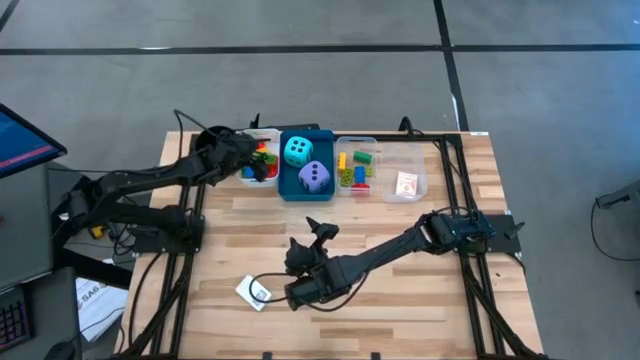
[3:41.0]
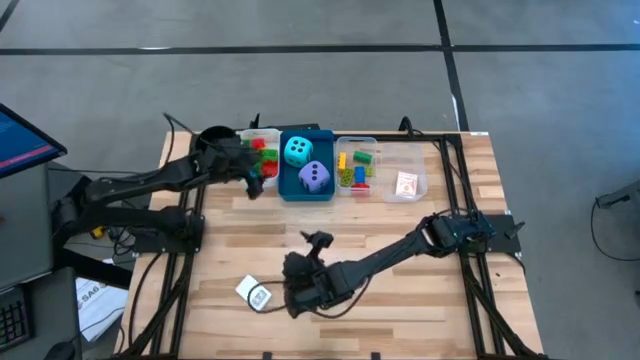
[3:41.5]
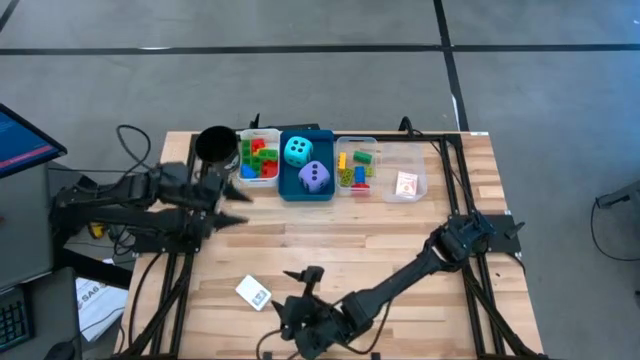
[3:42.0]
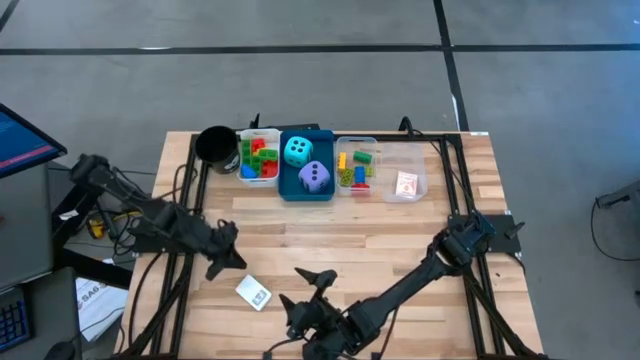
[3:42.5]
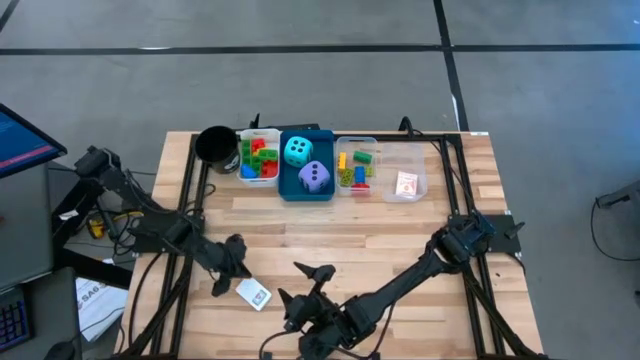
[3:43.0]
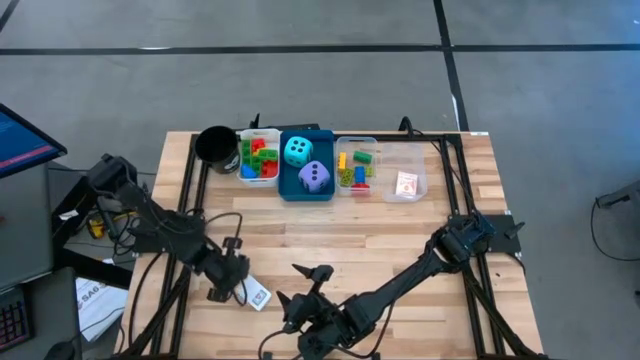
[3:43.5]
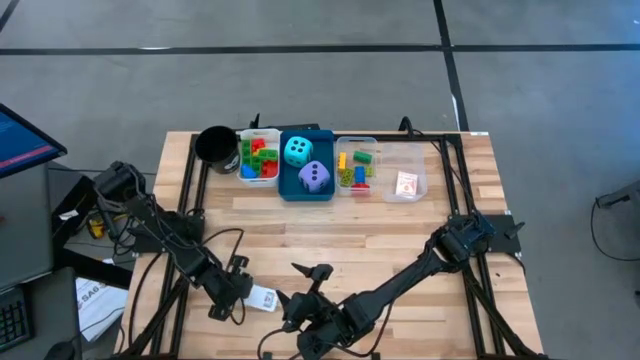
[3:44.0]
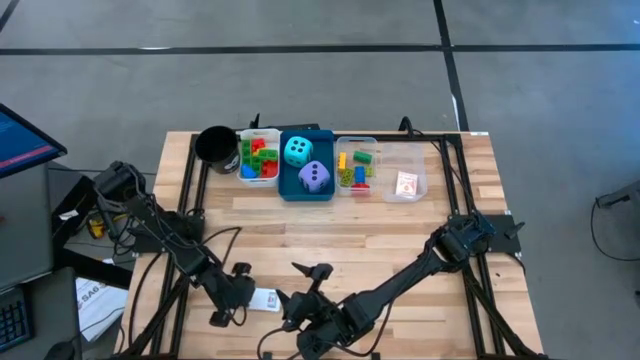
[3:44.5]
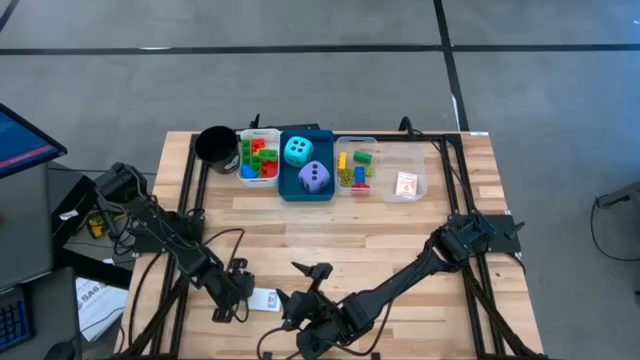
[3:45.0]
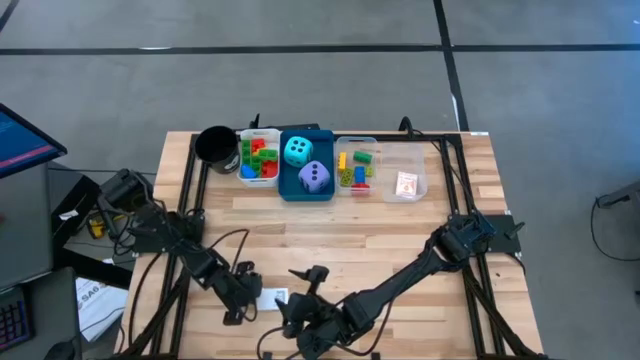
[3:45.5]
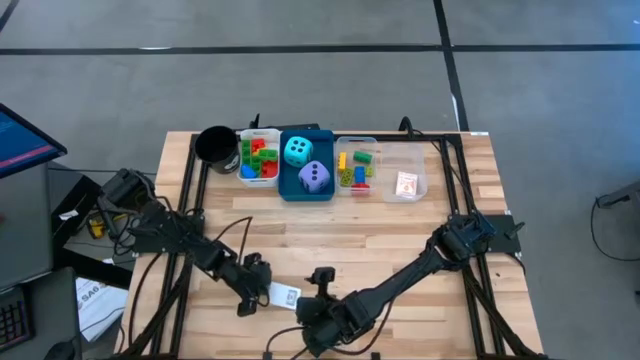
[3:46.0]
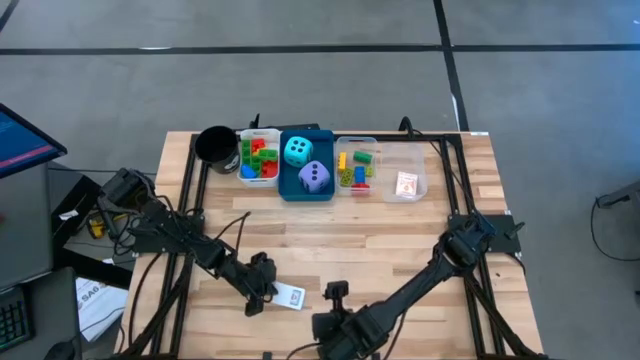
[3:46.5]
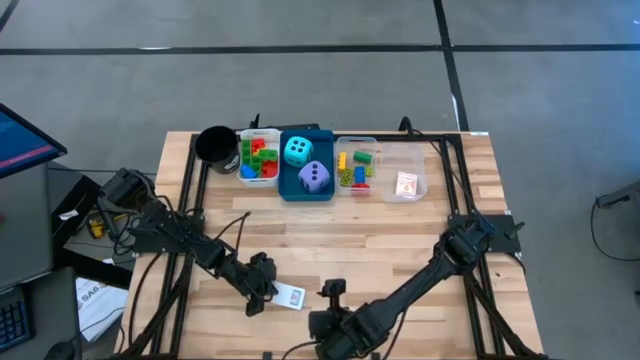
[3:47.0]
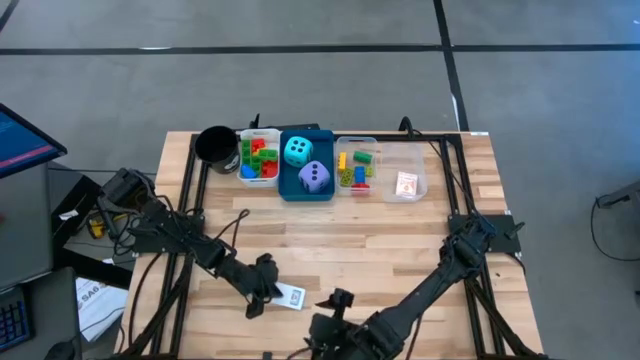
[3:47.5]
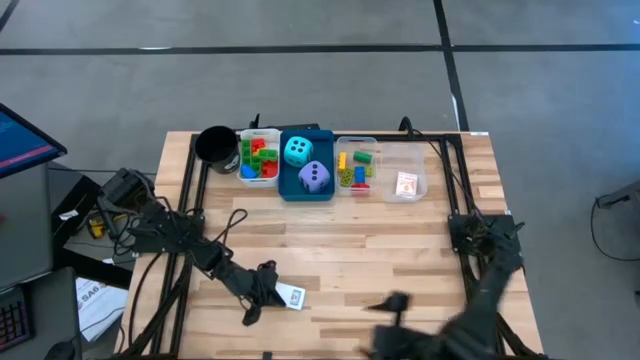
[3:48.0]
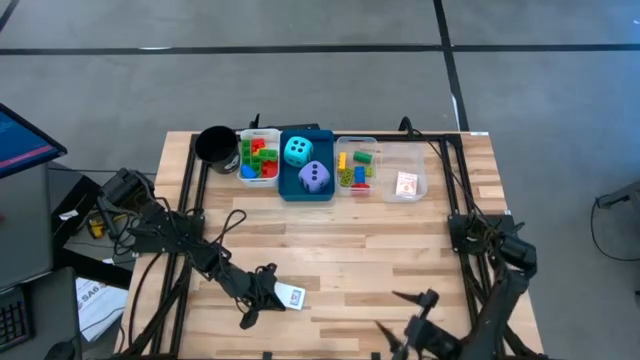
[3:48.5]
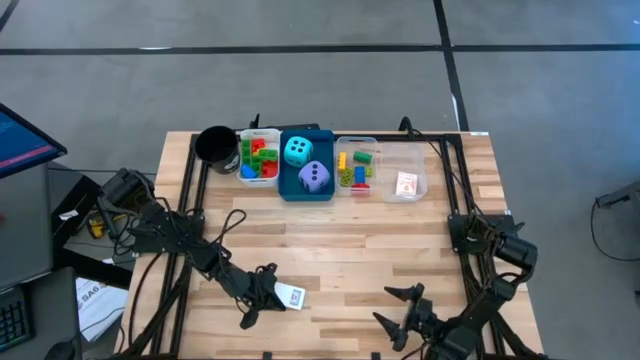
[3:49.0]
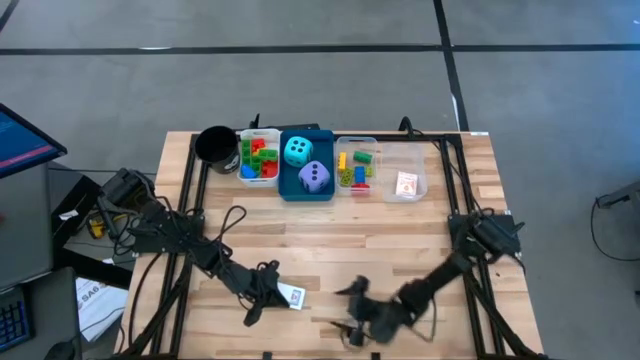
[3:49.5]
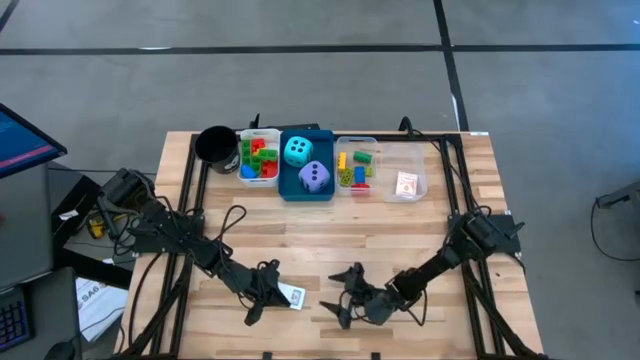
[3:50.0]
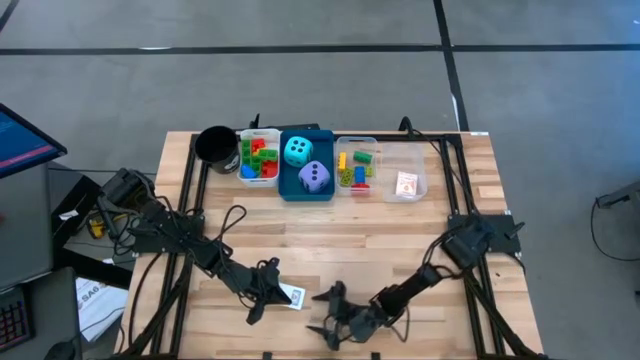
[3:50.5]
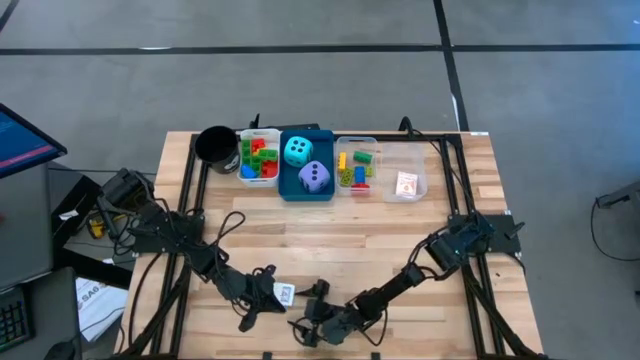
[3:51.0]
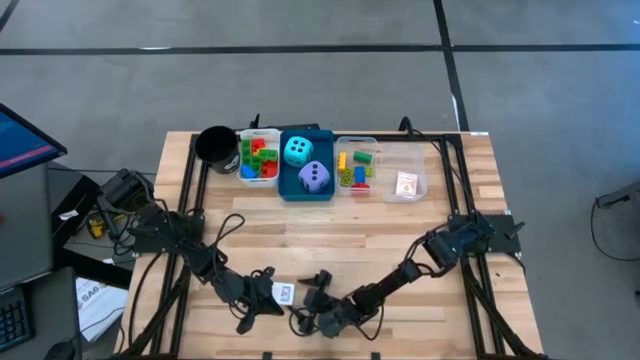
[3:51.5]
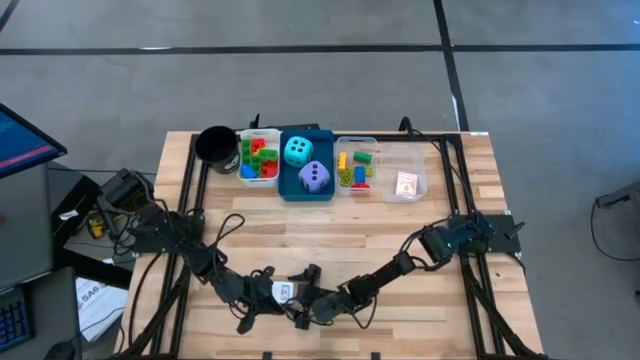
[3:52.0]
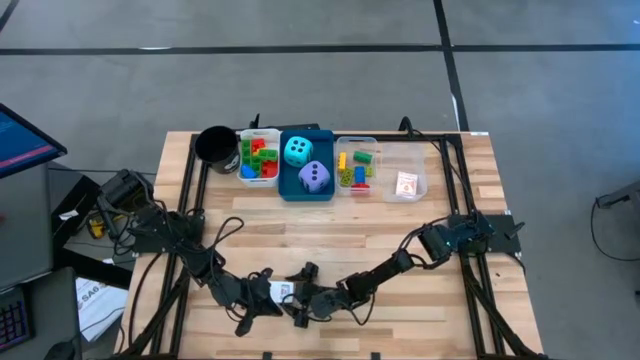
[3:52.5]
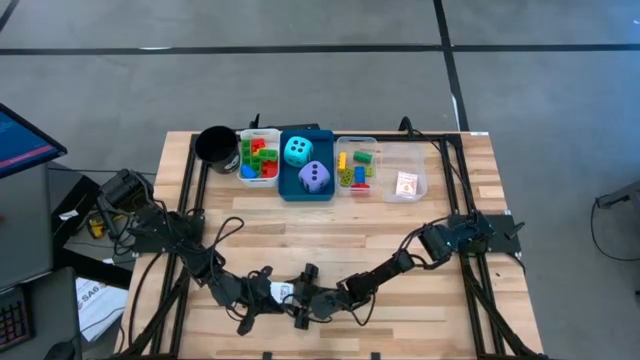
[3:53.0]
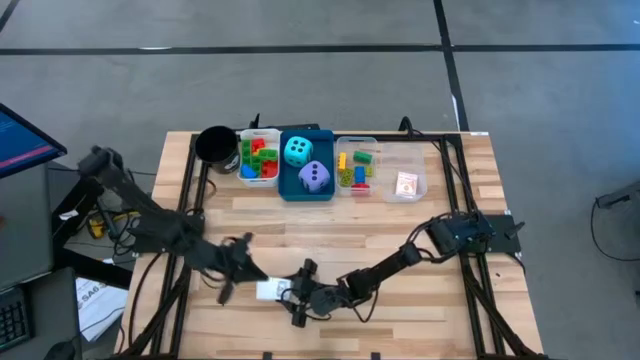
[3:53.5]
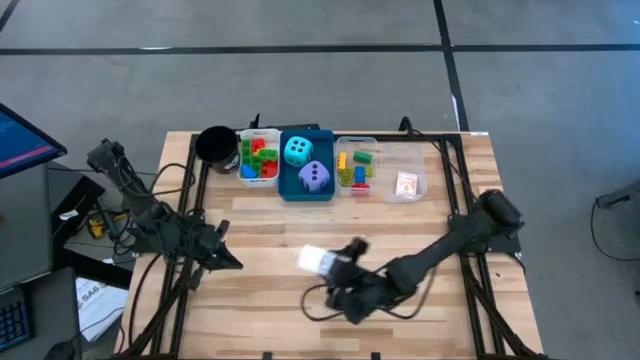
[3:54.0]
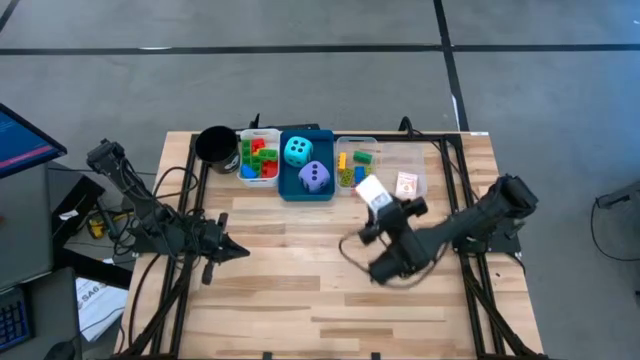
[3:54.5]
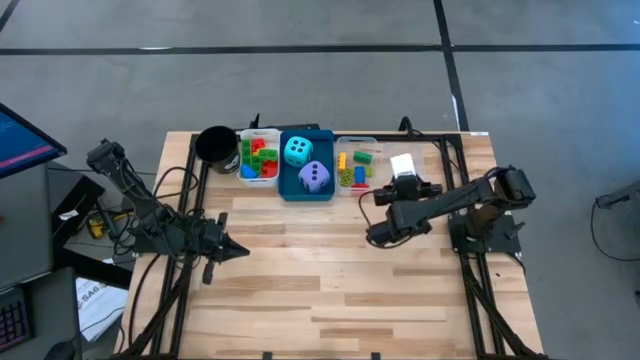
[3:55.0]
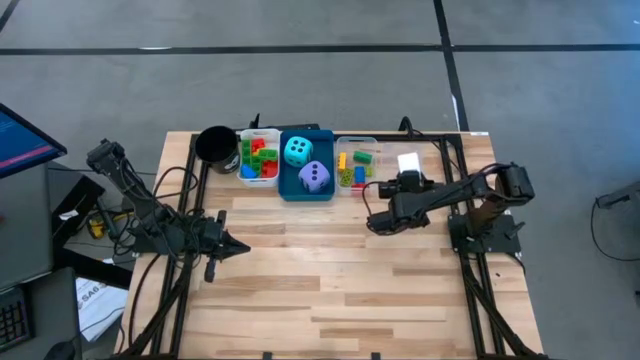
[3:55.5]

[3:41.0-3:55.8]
Task: Pick & Place Toys
Put the blue deck of cards into the right transparent bin

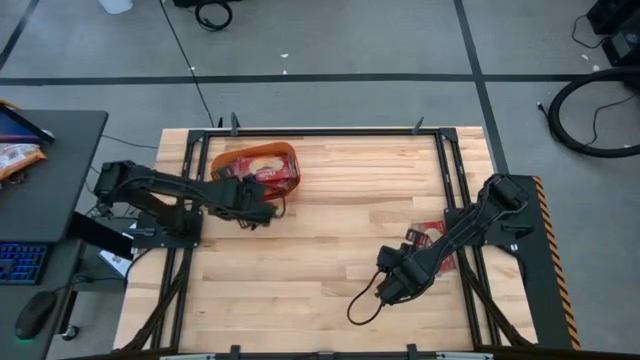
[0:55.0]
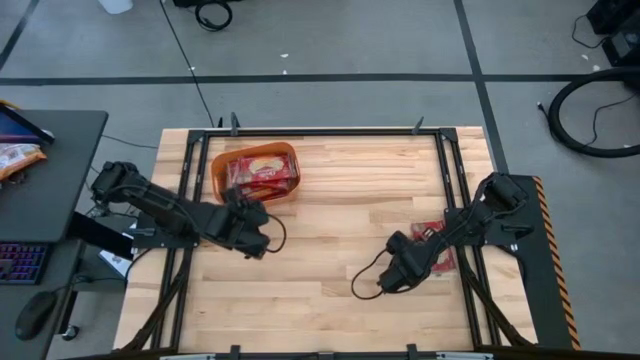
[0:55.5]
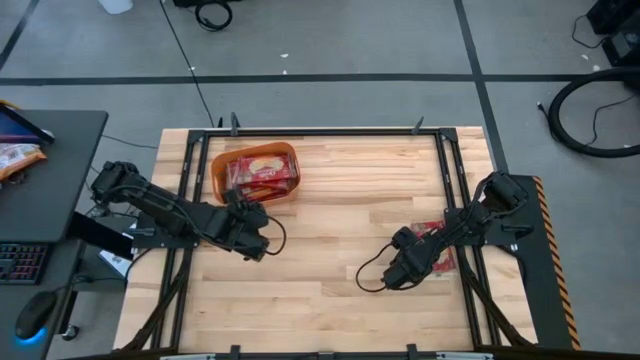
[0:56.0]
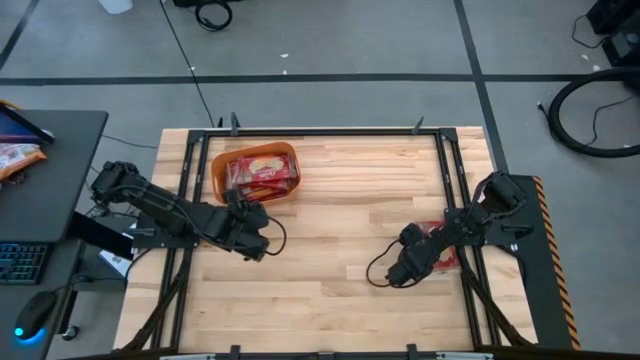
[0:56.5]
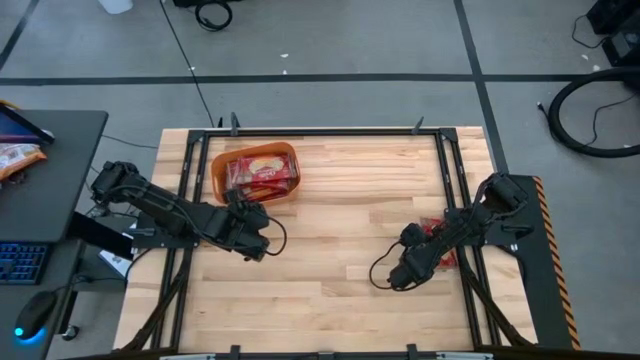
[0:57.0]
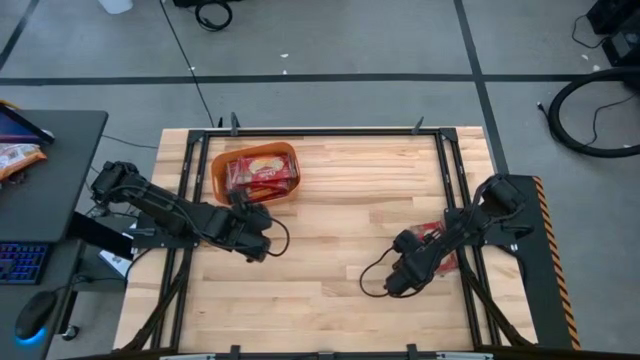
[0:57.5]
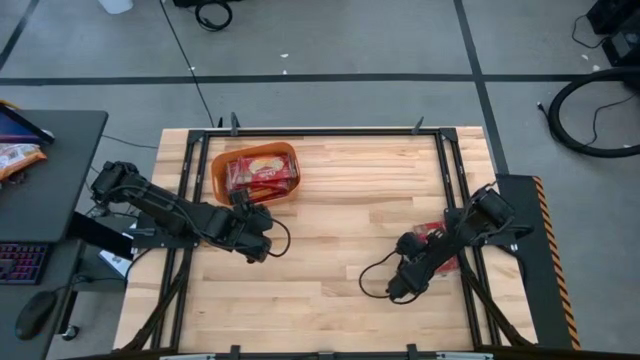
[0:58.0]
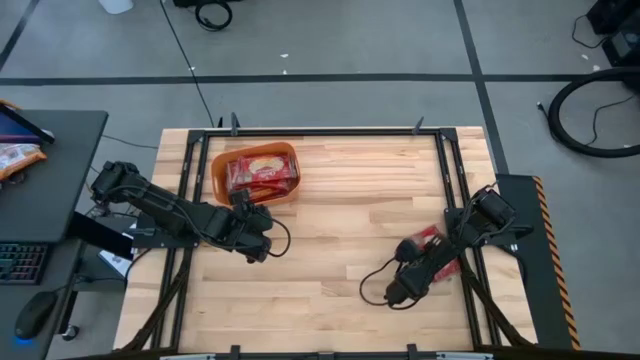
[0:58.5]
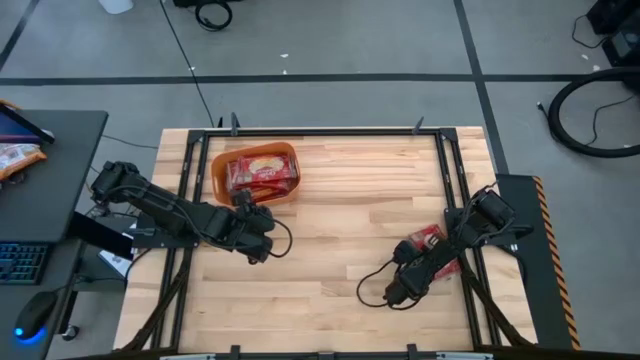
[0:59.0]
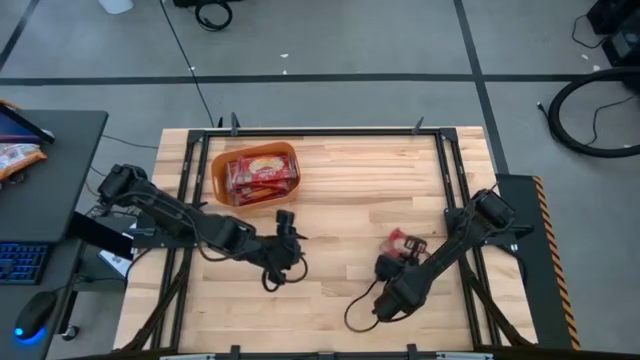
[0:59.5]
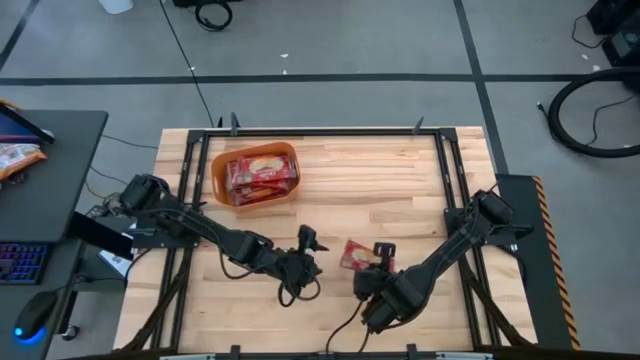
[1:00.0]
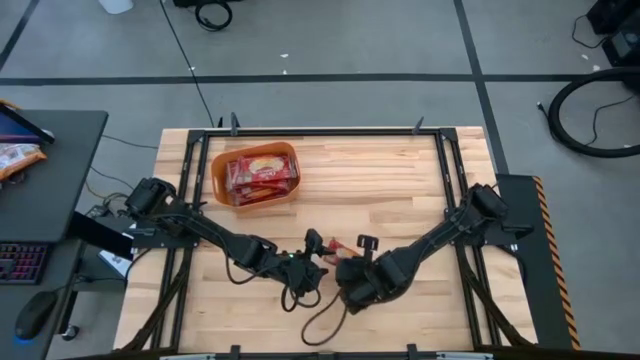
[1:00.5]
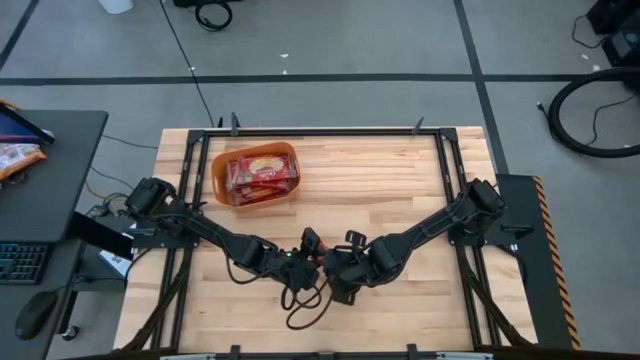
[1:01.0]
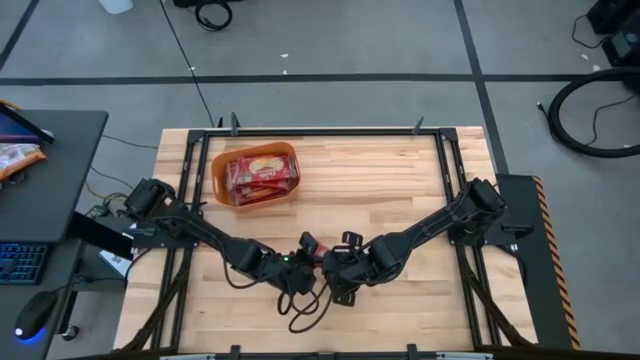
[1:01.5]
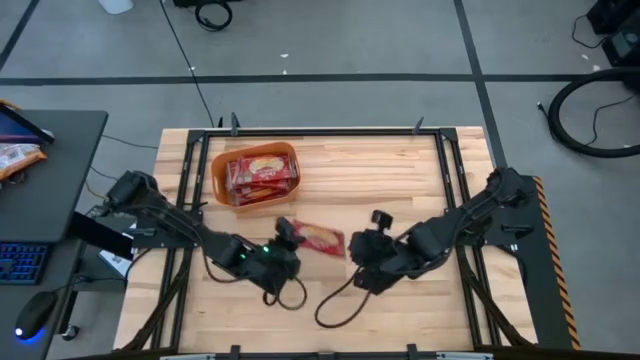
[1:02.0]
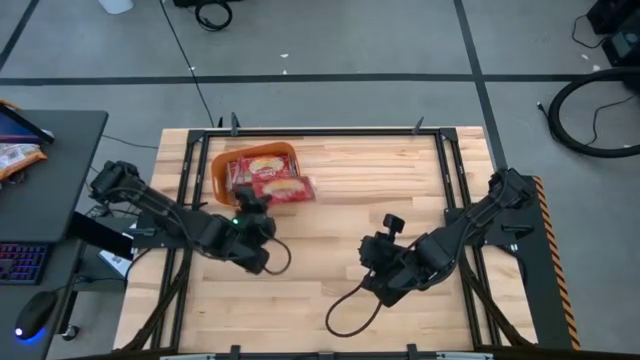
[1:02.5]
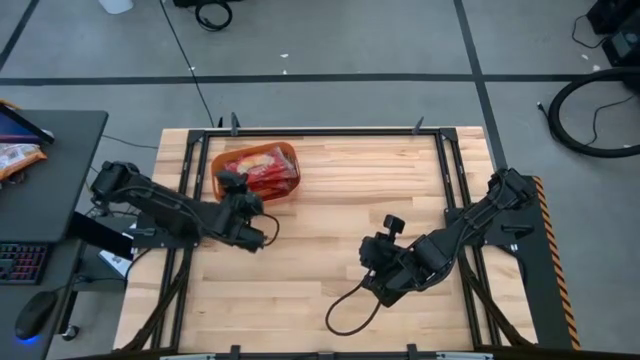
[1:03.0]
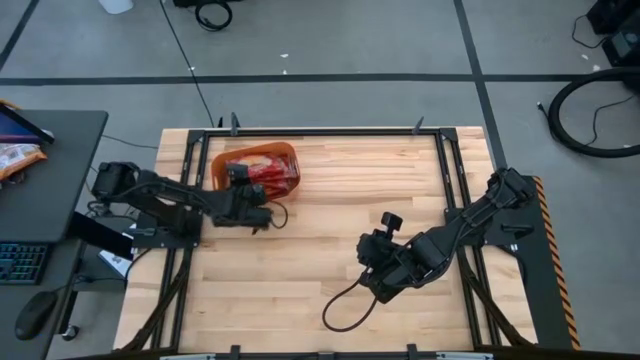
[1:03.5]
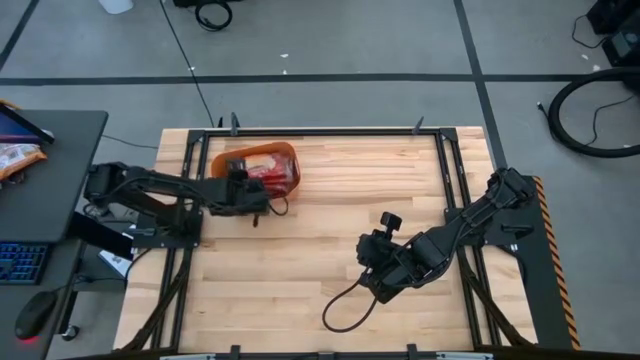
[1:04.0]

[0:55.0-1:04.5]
Task: Sort popcorn bags into baskets
Put the popcorn bag into the orange bin
